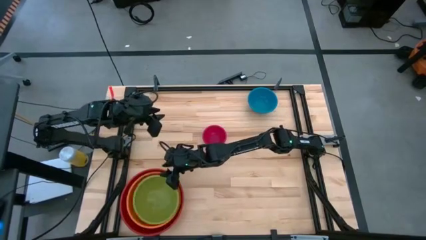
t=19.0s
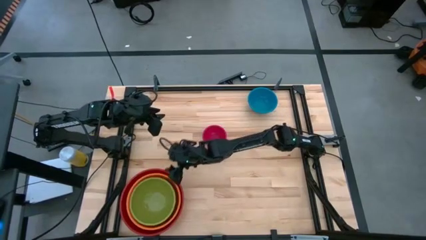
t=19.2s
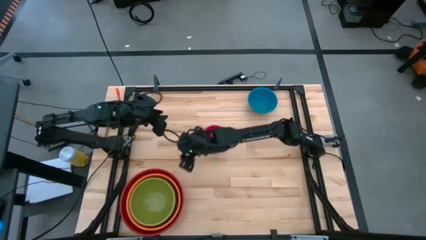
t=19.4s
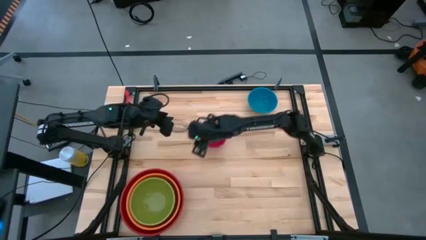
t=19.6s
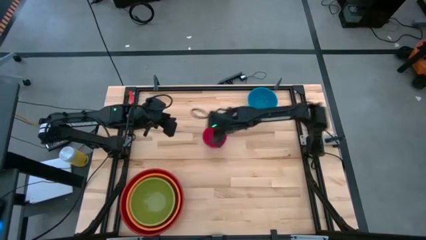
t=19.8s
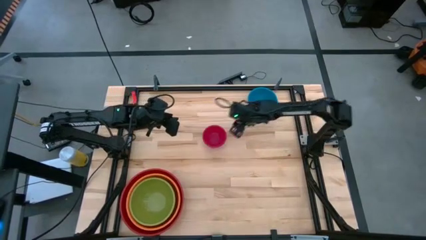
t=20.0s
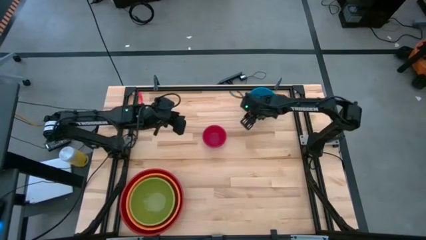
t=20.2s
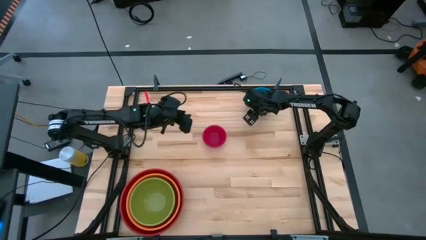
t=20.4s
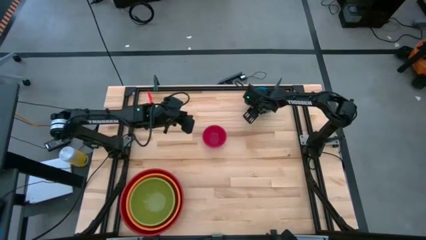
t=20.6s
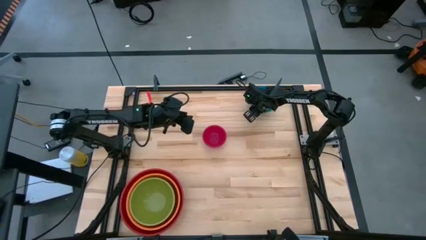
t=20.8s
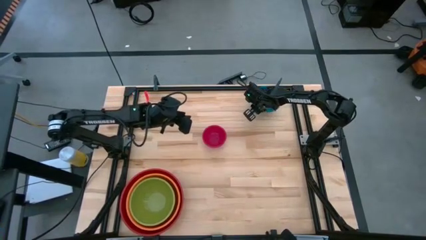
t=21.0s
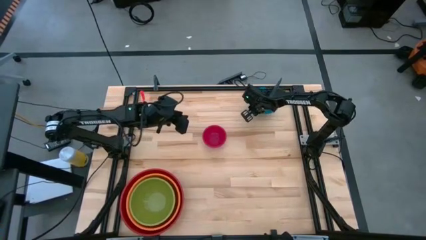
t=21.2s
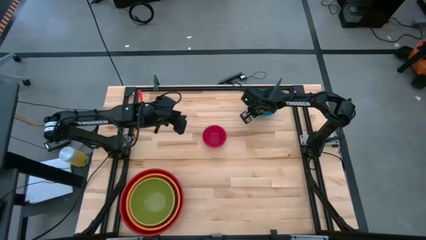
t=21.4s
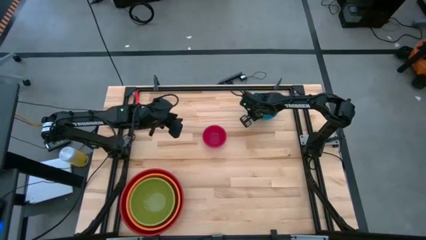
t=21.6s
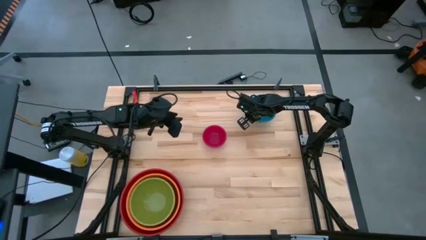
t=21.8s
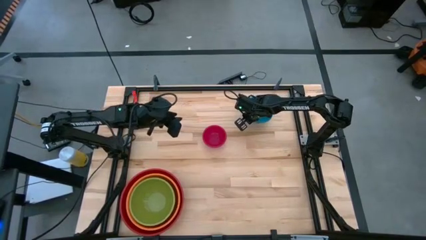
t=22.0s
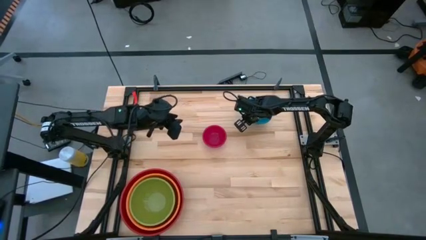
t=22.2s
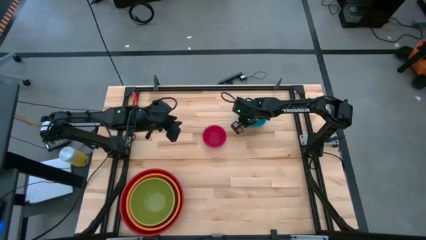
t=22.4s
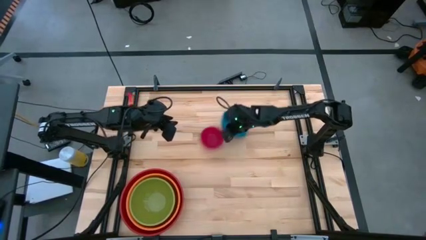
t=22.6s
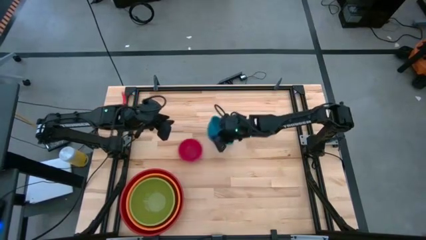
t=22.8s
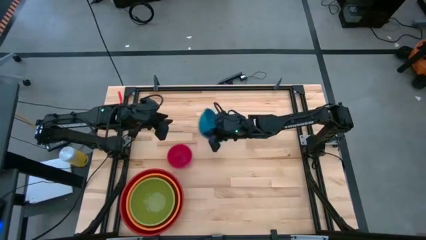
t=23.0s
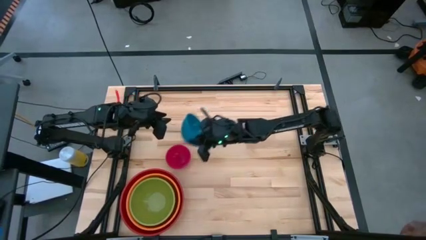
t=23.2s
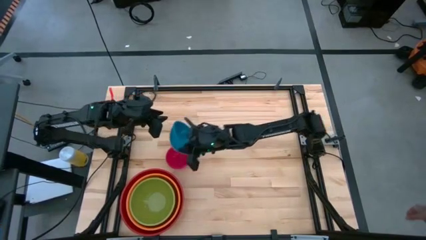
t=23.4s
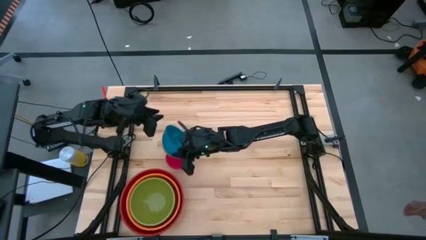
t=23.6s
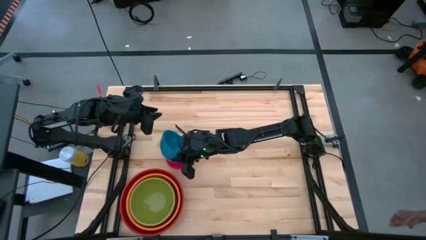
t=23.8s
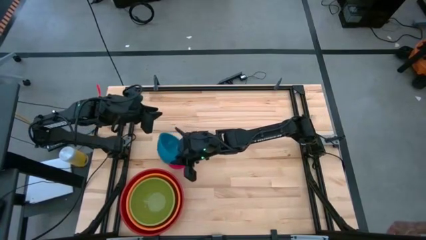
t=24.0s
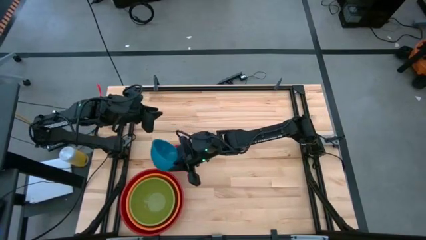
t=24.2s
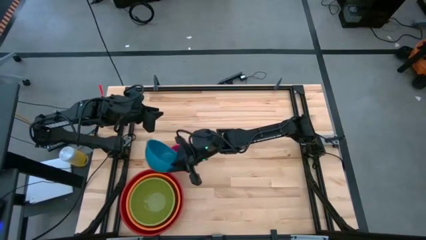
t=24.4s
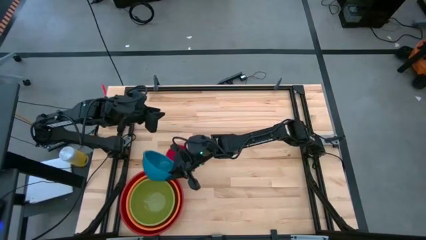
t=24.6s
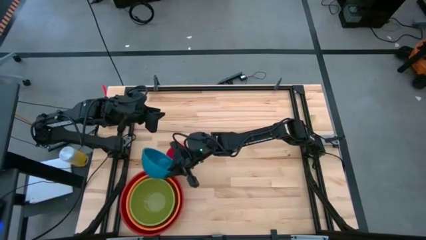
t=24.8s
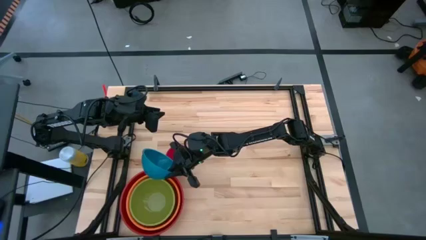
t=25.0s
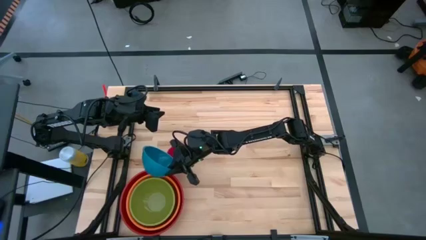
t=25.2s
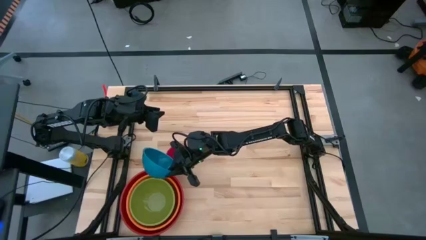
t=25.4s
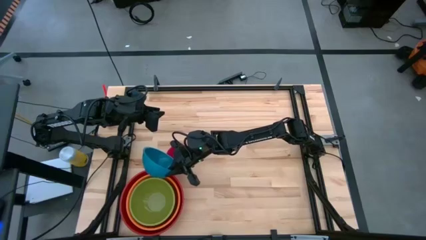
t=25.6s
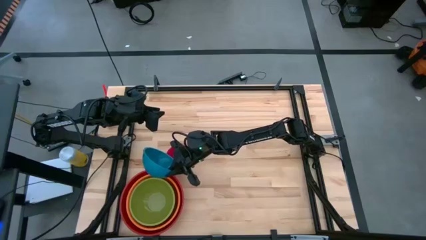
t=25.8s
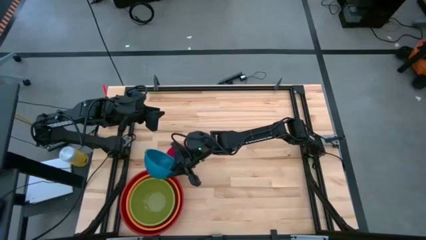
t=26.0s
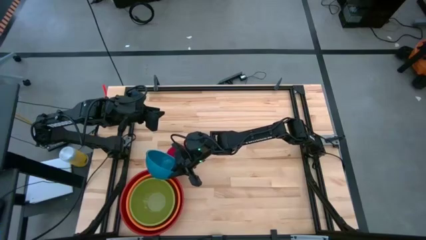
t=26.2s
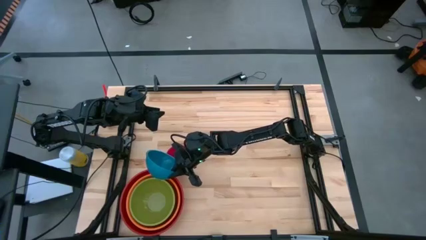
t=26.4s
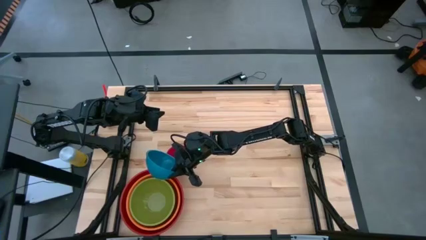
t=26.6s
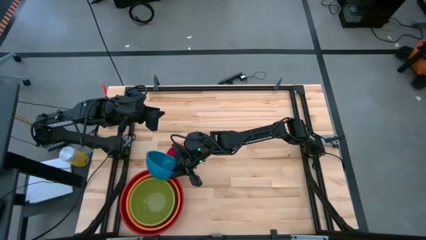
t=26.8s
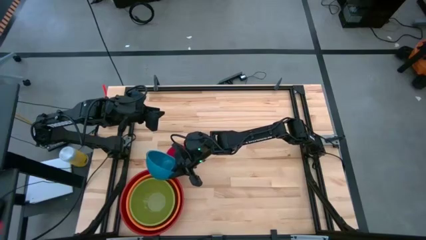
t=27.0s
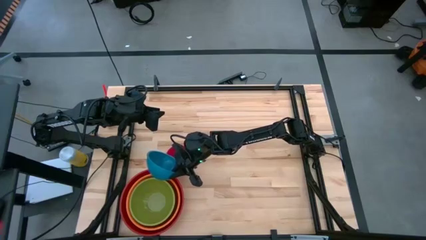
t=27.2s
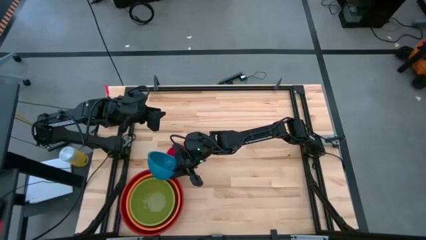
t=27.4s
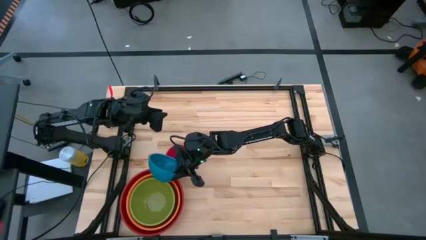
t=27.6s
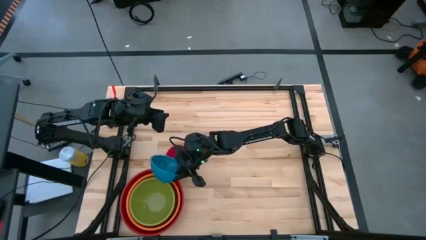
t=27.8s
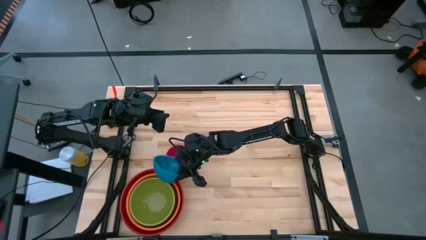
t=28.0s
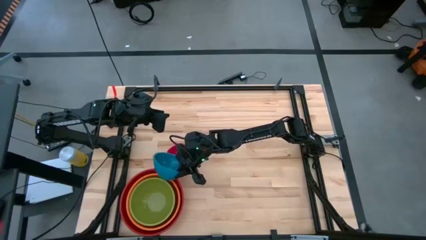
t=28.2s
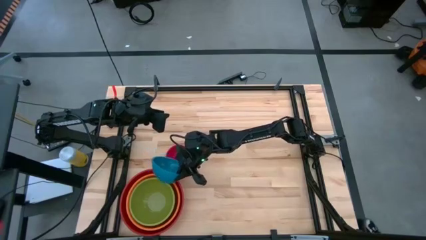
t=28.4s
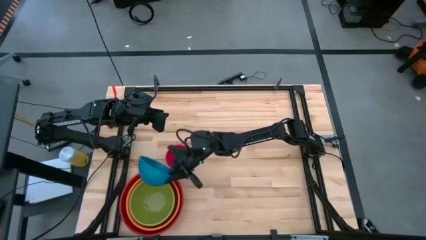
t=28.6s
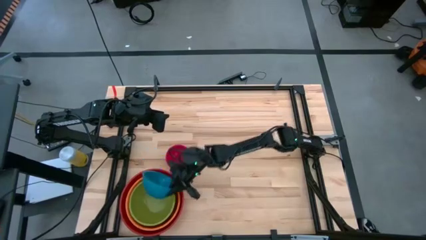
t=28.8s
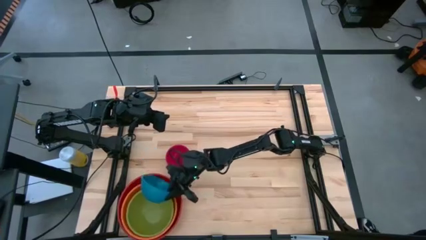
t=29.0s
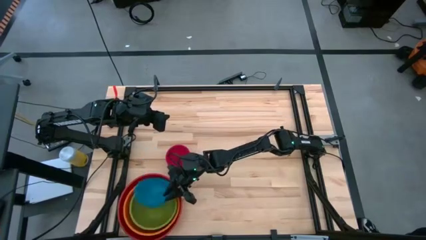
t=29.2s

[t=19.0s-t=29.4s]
Stack the blue bowl on top of the green bowl

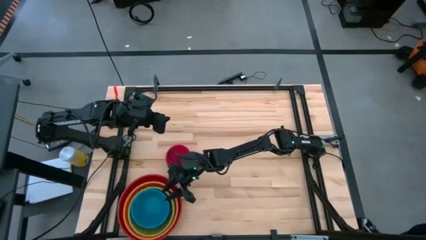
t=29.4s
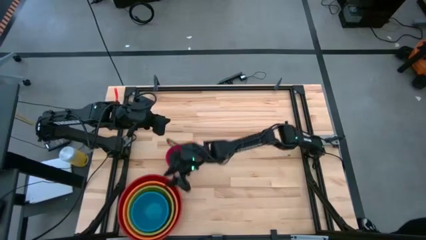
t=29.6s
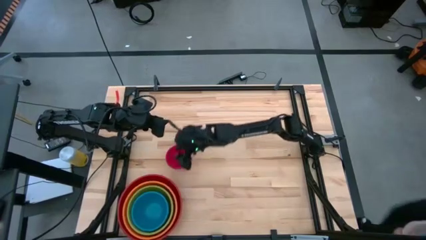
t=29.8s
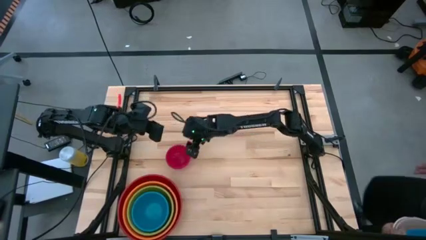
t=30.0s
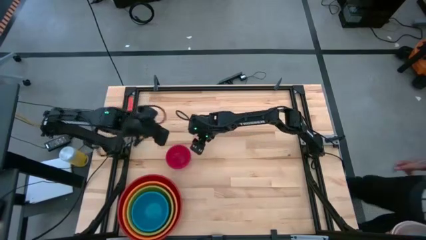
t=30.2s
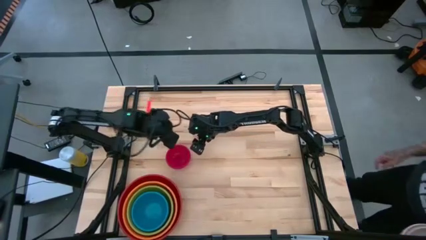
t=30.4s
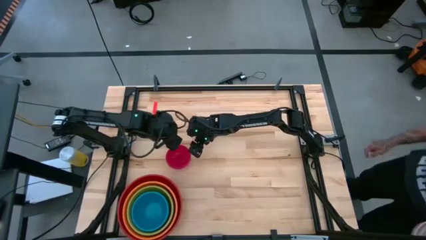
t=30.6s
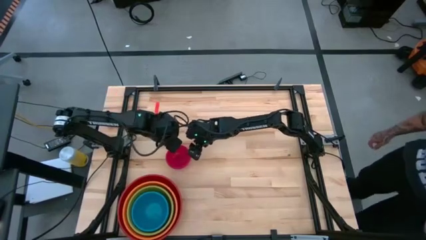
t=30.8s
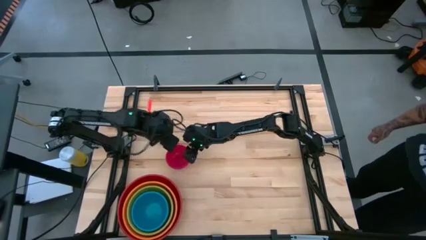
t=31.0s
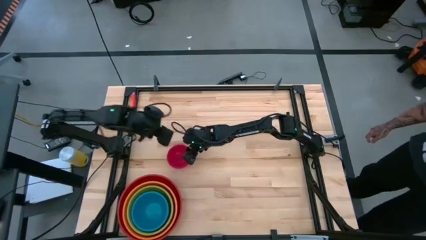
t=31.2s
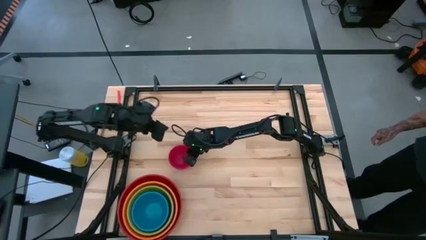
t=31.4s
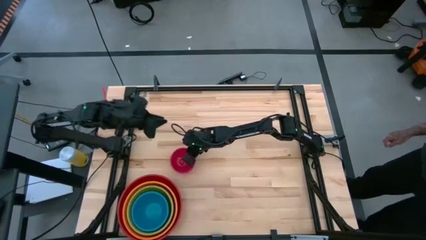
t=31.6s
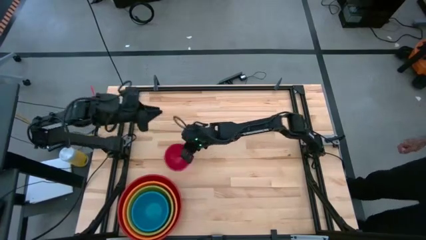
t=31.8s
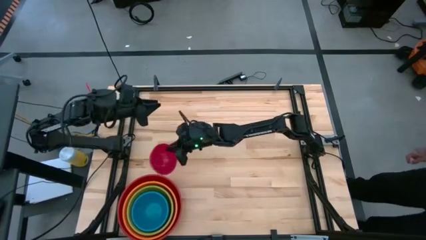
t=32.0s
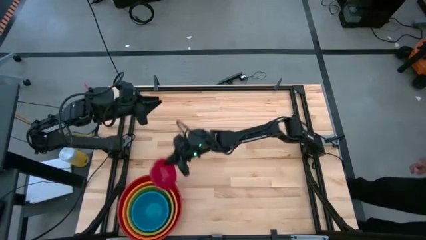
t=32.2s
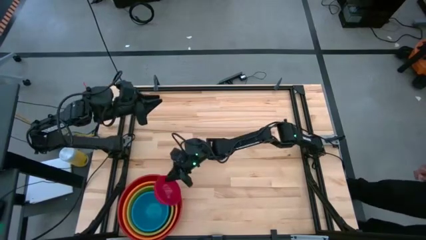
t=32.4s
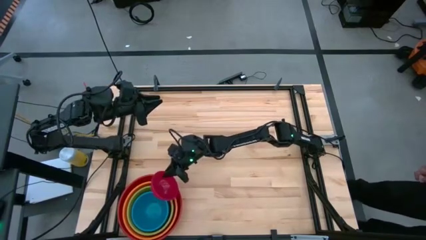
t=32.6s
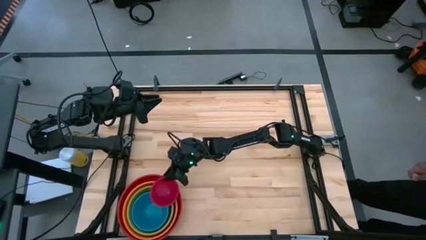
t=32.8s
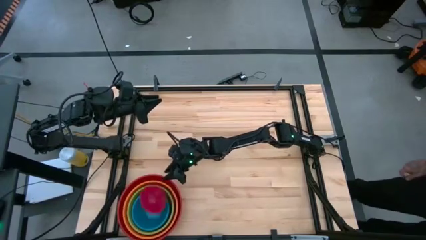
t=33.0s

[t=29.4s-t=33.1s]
Stack the pink bowl on top of the blue bowl
